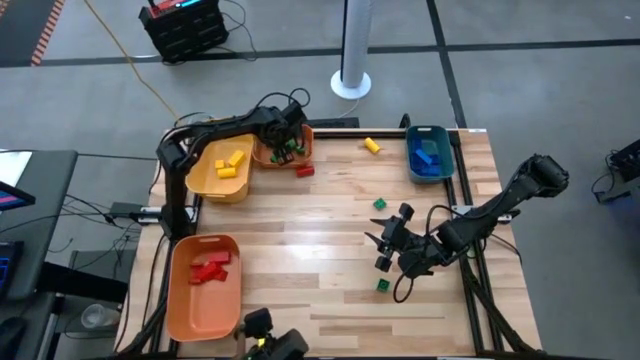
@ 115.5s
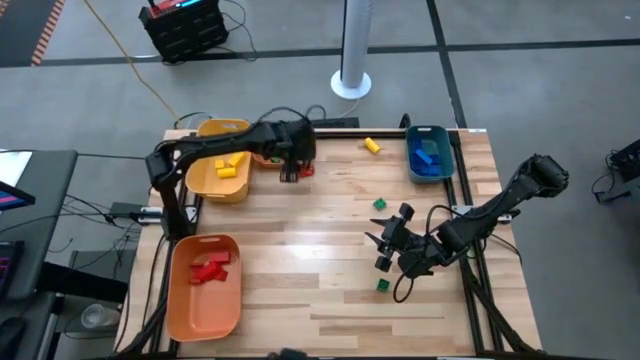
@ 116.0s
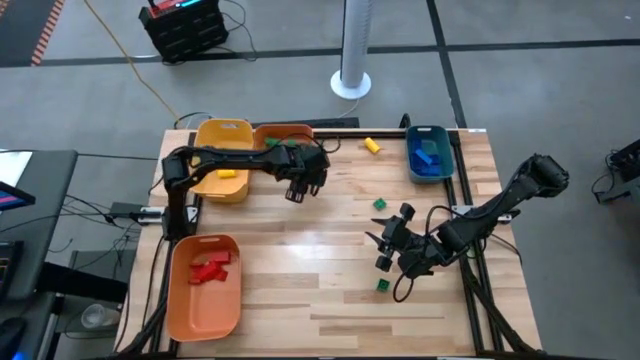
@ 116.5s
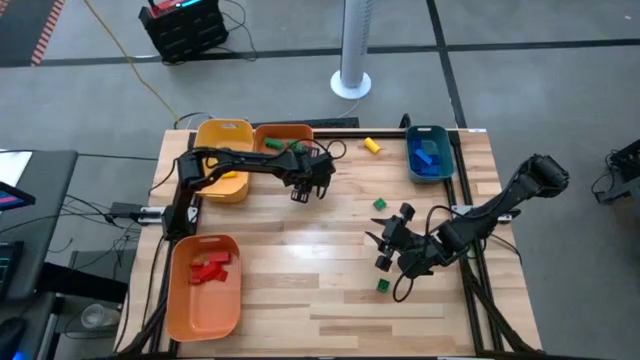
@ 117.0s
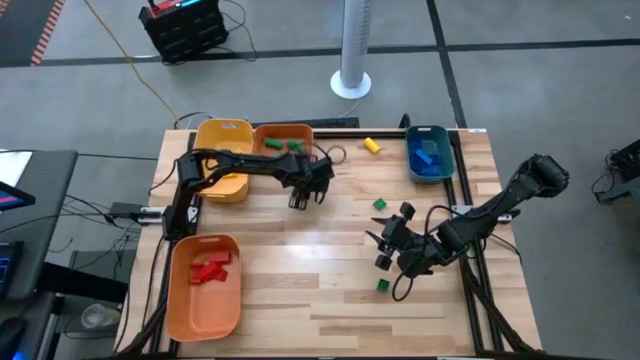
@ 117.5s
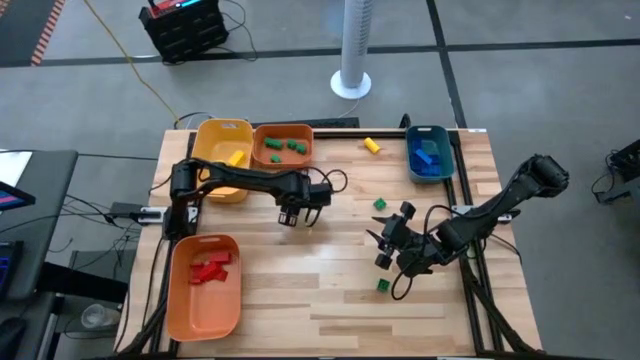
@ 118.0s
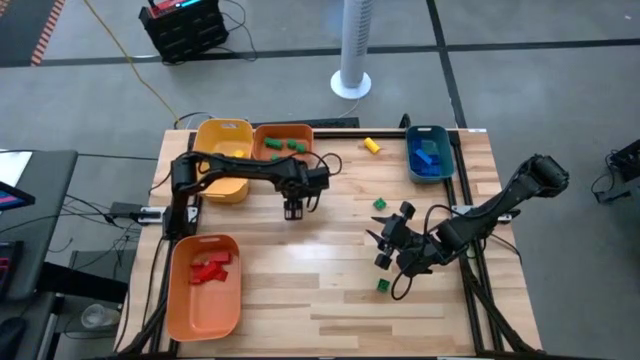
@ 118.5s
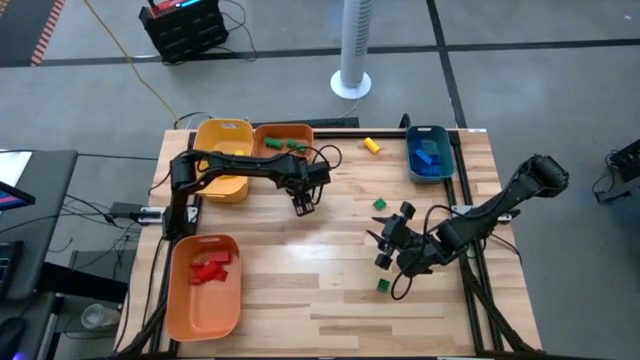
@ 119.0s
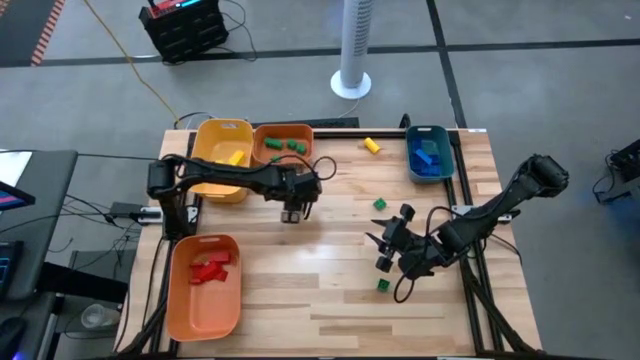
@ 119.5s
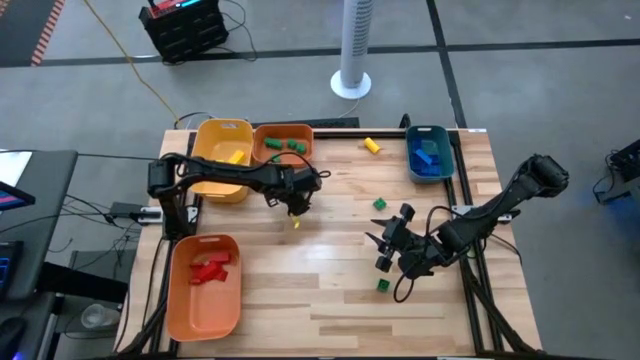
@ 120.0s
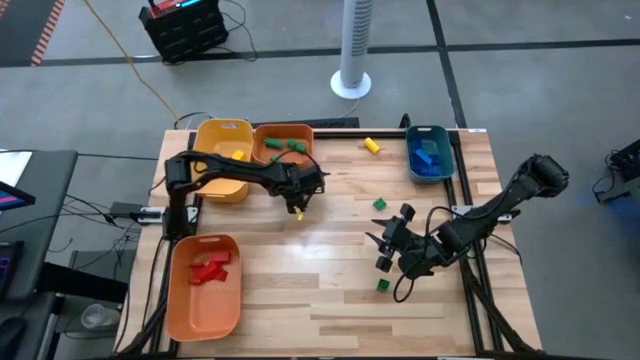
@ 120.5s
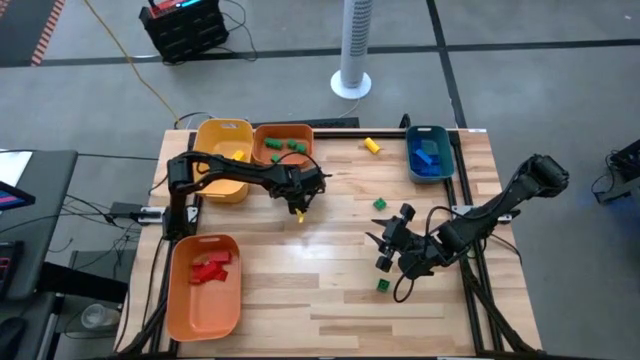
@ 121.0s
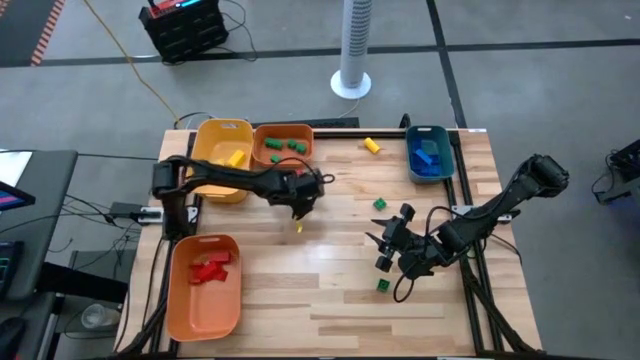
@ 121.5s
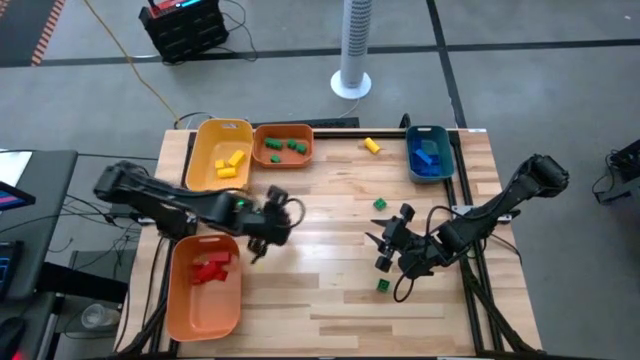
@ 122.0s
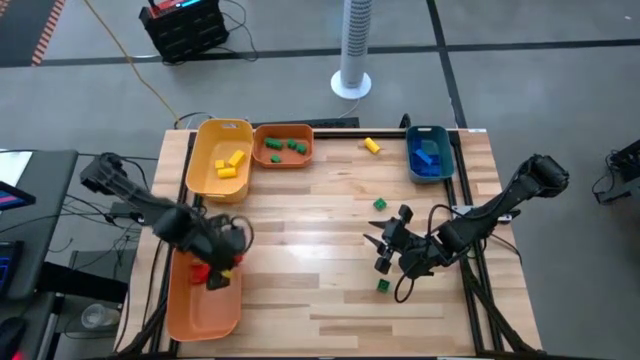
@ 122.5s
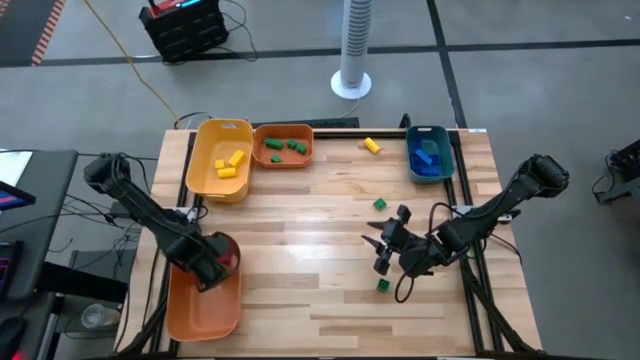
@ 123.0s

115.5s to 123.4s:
Task: Sort blocks
Put the red wooden block into the bottom orange bin

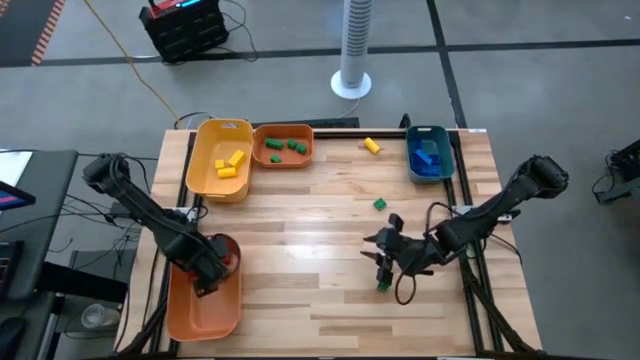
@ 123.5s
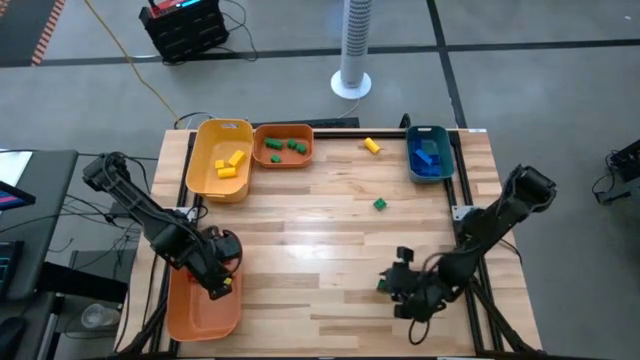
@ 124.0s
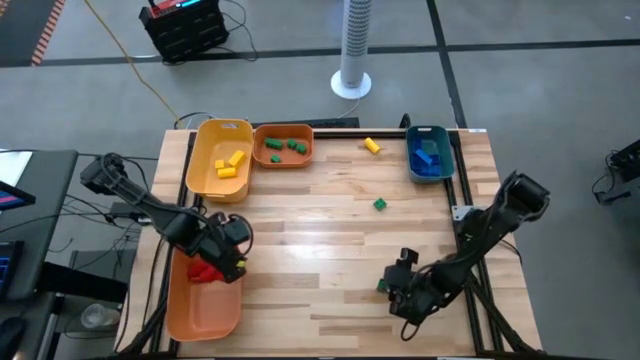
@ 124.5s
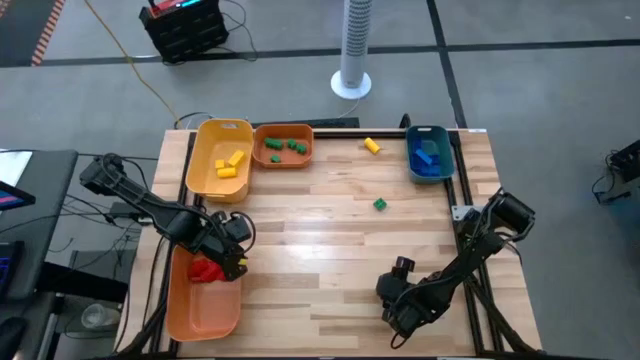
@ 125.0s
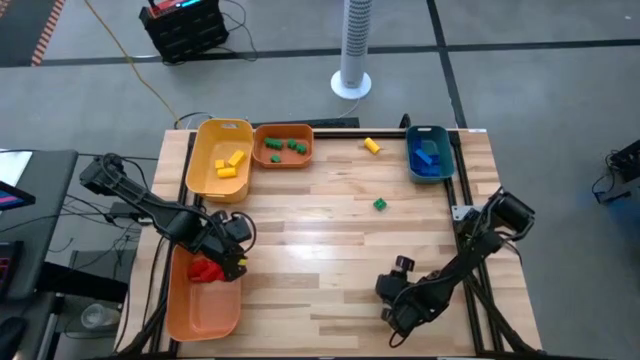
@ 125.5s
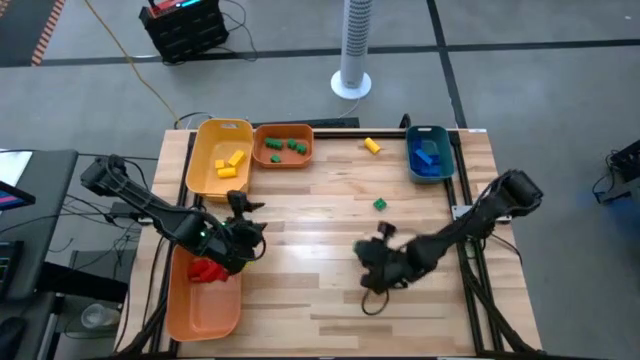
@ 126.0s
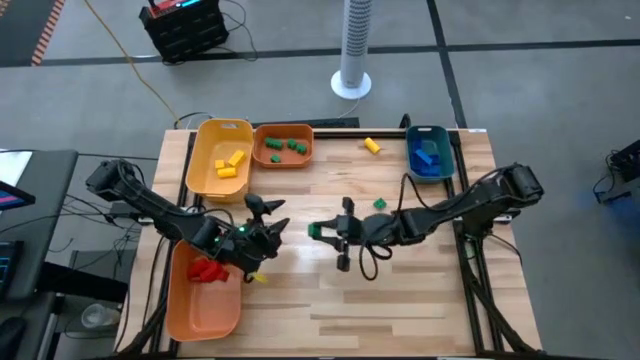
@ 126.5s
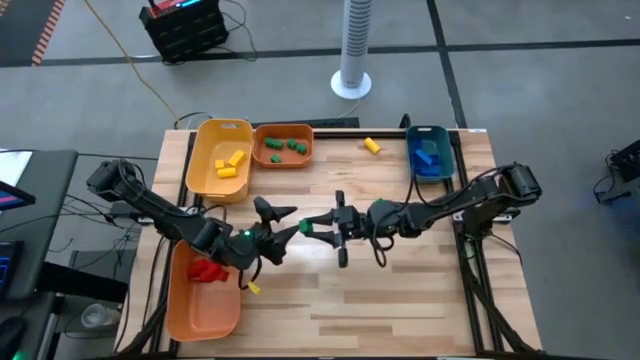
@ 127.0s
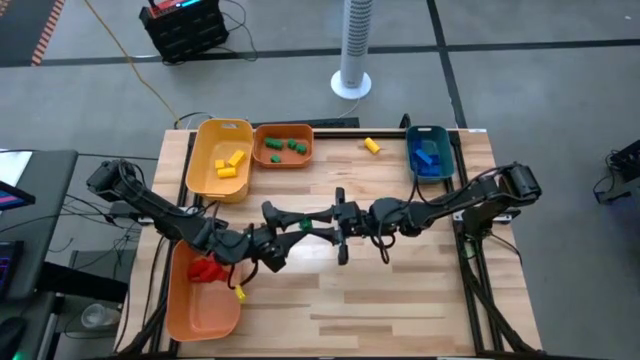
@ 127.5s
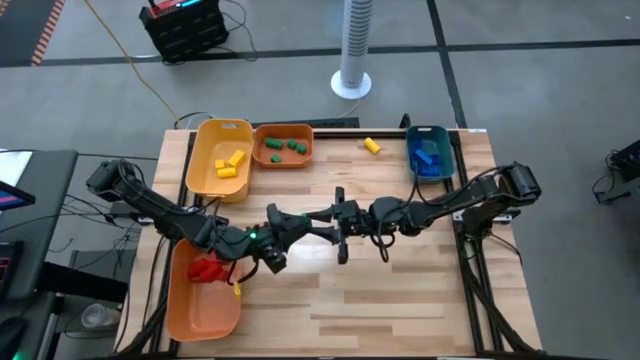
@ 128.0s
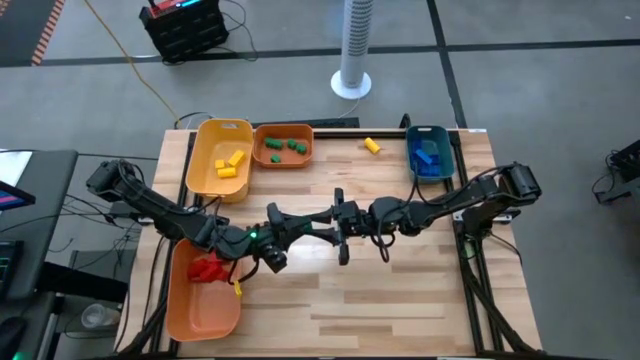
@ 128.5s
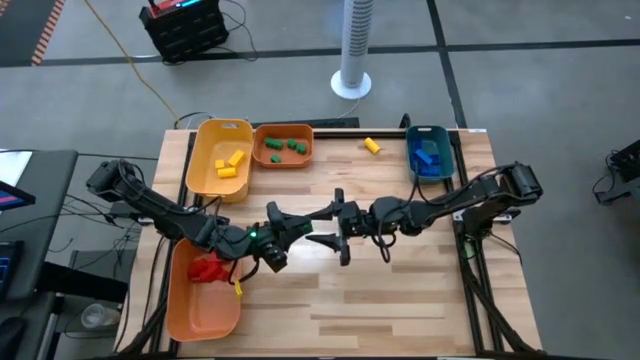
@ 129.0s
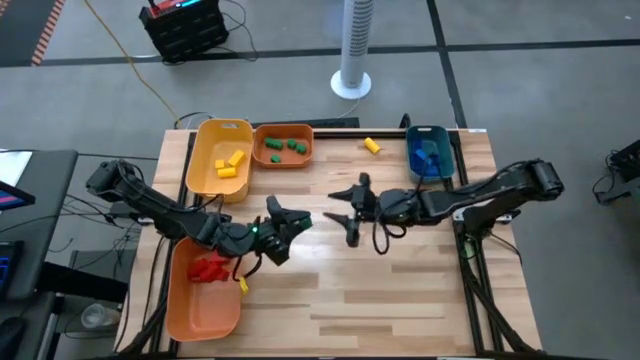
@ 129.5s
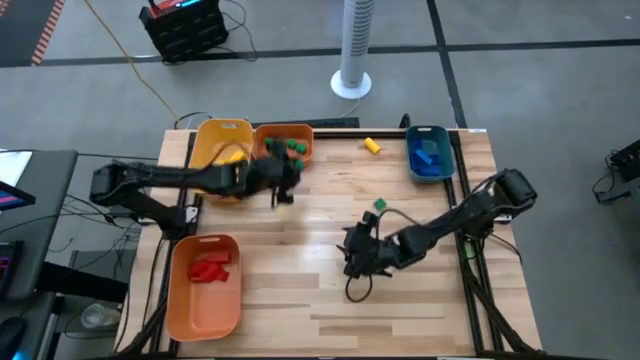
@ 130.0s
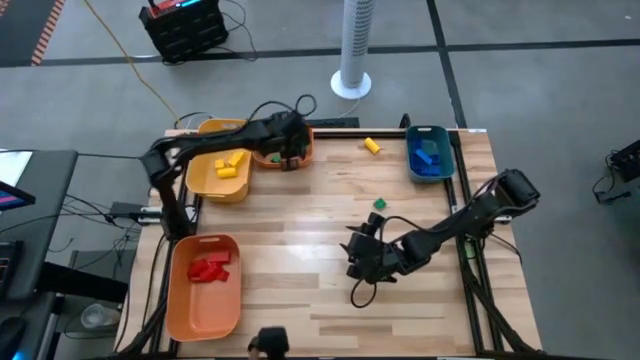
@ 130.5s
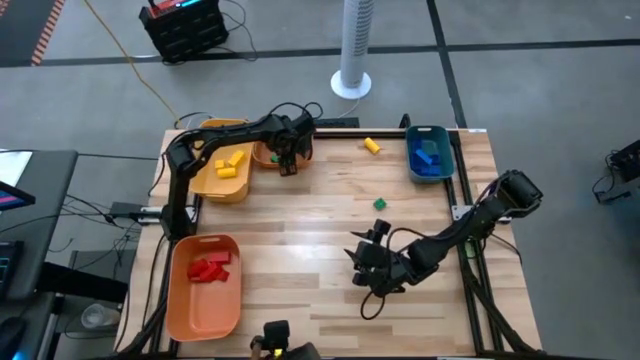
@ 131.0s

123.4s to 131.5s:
Put the green game piece into the top orange bin

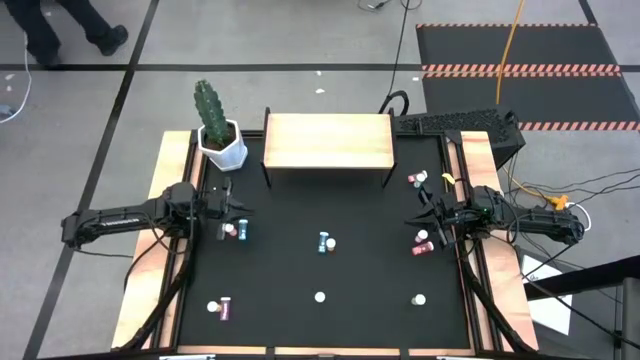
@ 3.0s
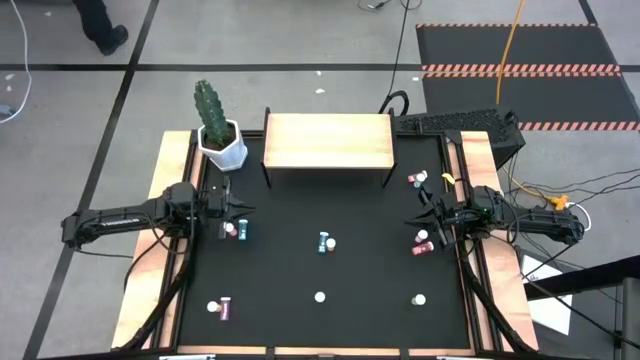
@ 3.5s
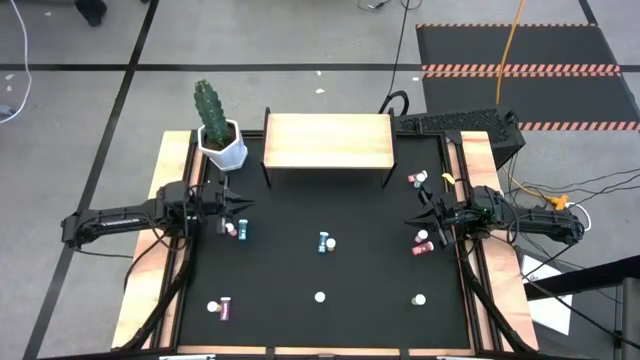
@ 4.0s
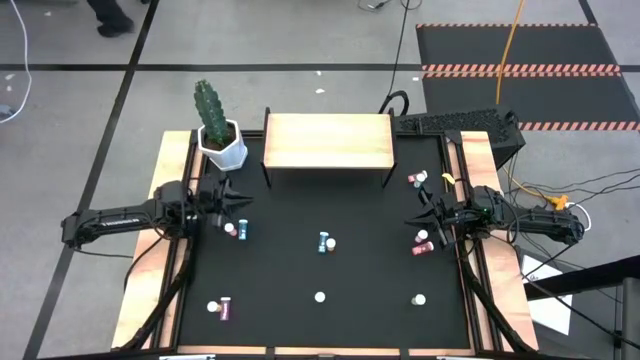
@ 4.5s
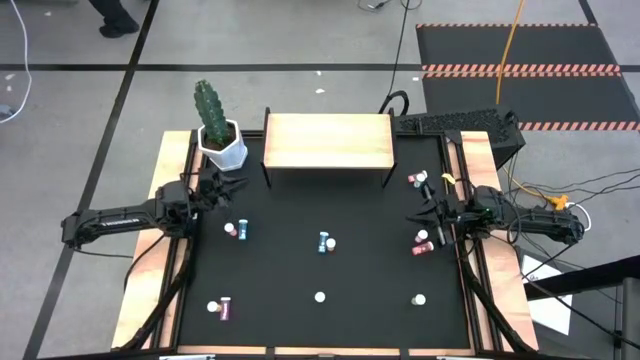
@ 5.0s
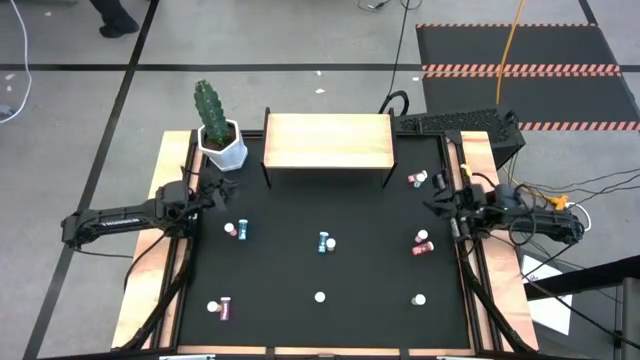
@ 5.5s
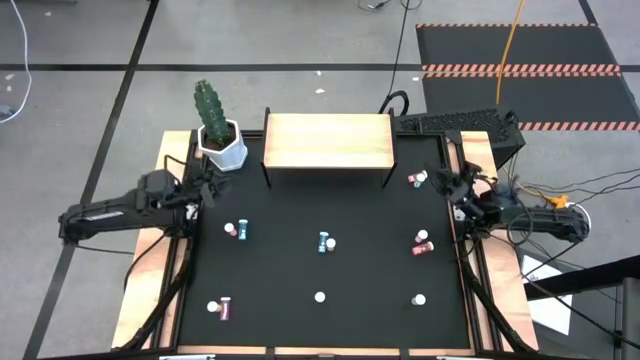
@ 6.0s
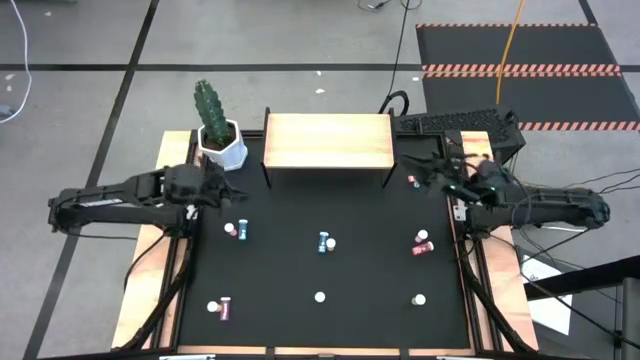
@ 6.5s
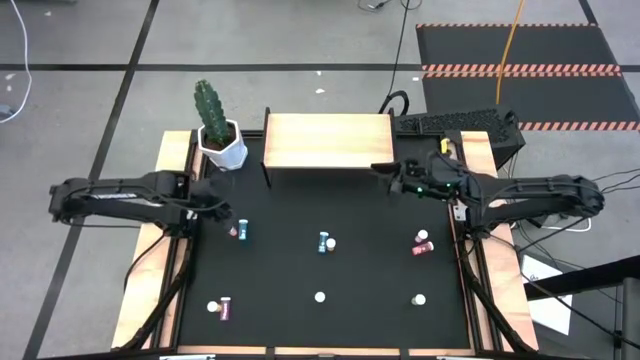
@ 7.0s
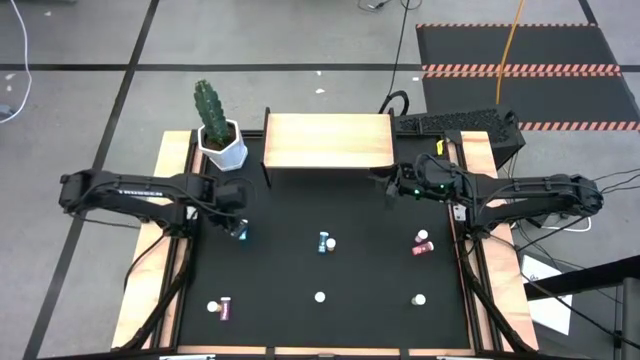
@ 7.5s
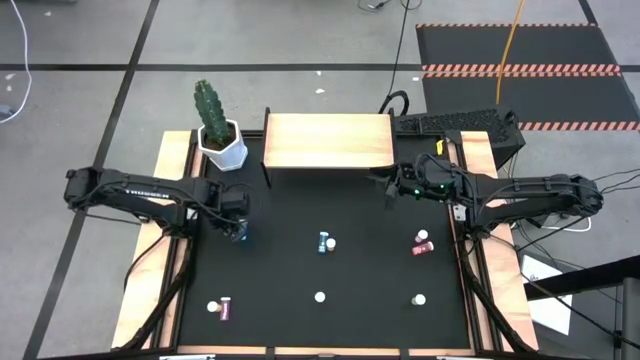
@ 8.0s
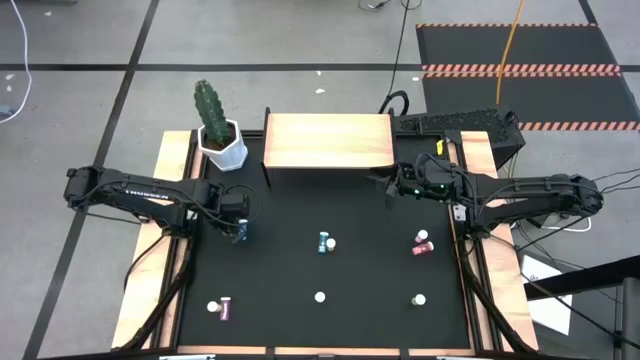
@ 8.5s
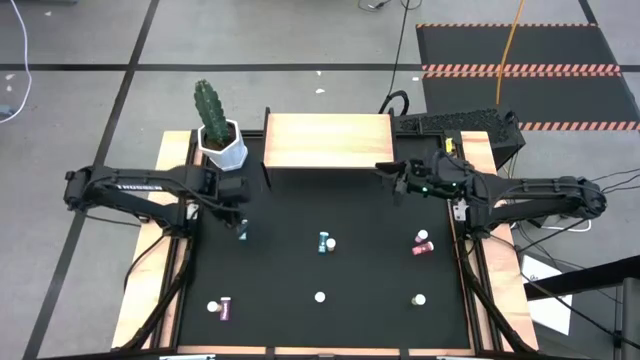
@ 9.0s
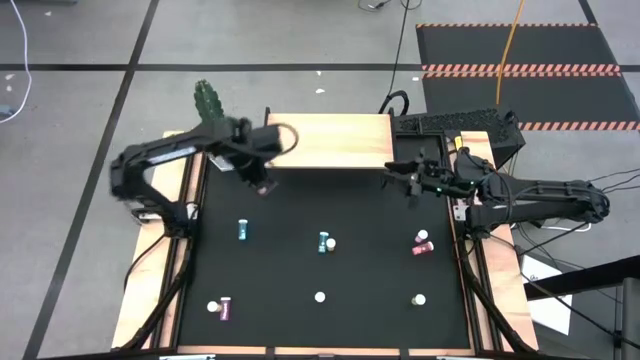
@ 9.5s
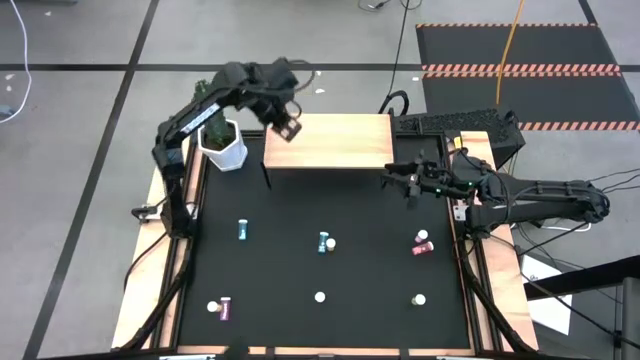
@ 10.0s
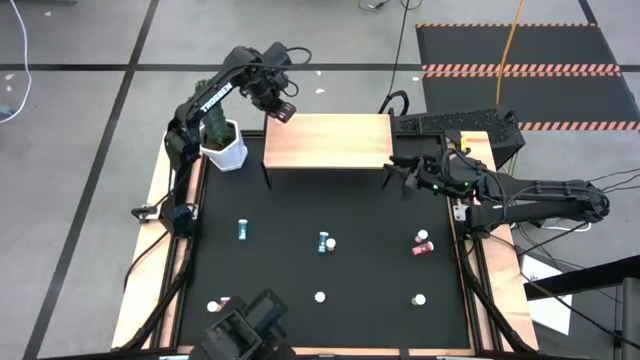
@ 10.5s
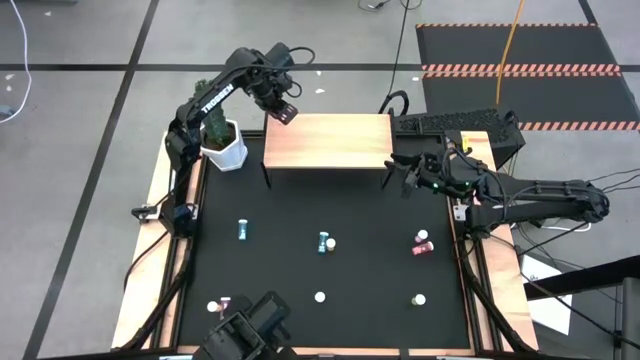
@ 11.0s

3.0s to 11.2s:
Task: Pick and place medicine bottles onto shelf by color
Put the left orange pill bottle on the shelf
